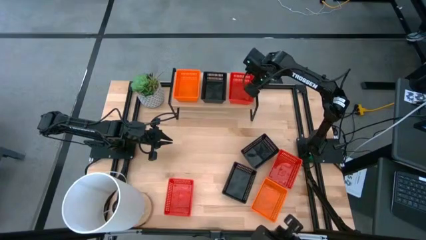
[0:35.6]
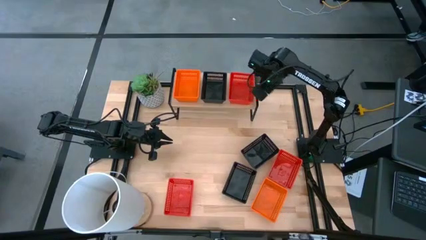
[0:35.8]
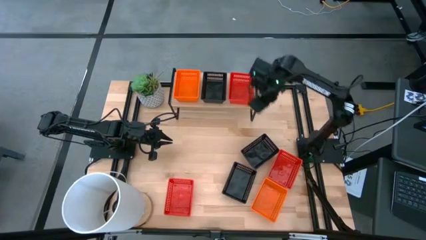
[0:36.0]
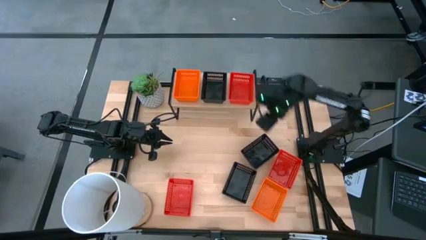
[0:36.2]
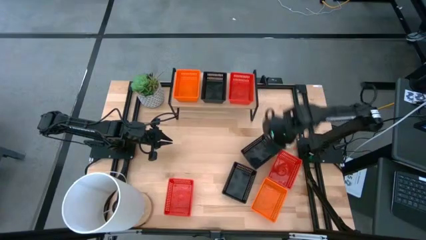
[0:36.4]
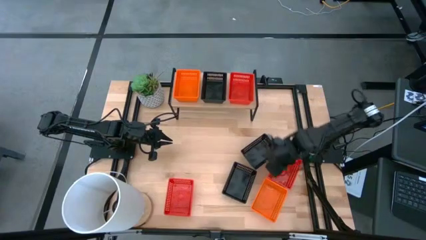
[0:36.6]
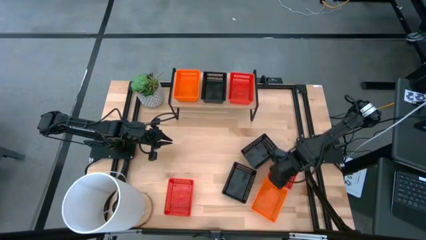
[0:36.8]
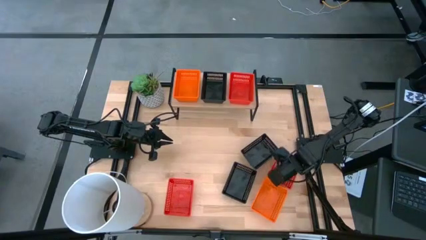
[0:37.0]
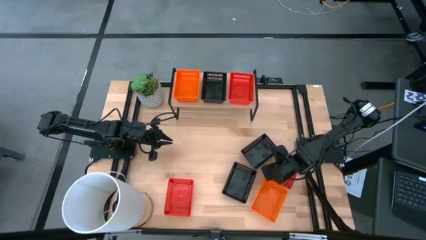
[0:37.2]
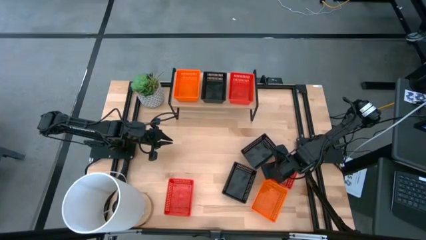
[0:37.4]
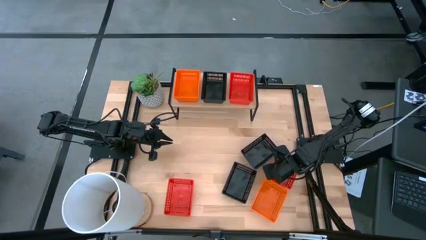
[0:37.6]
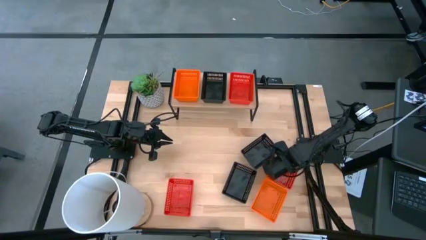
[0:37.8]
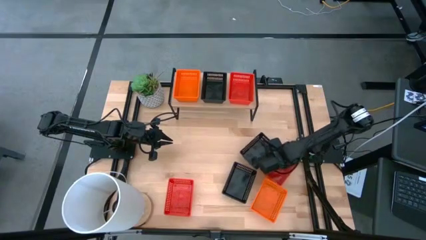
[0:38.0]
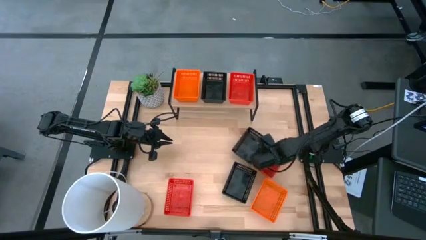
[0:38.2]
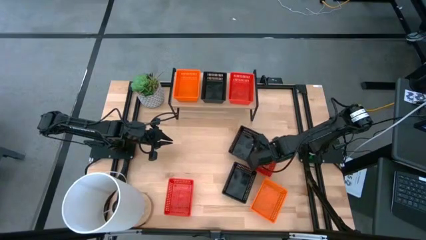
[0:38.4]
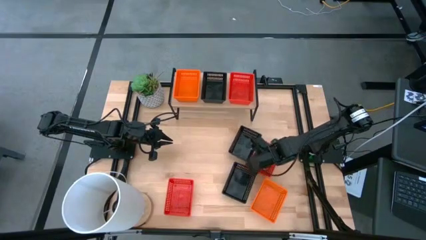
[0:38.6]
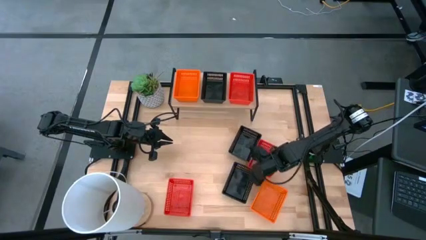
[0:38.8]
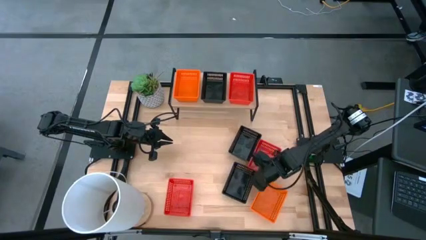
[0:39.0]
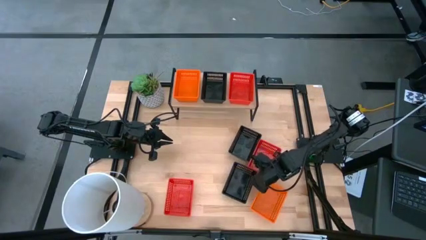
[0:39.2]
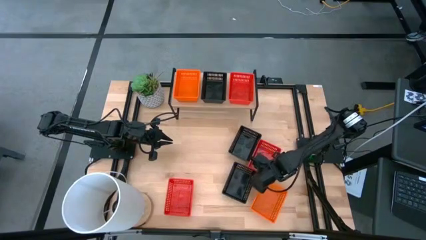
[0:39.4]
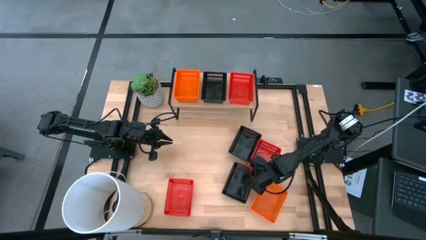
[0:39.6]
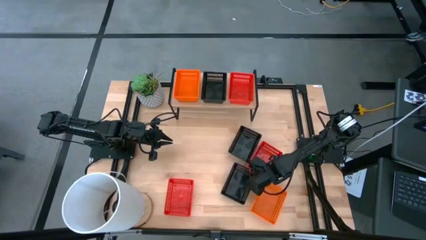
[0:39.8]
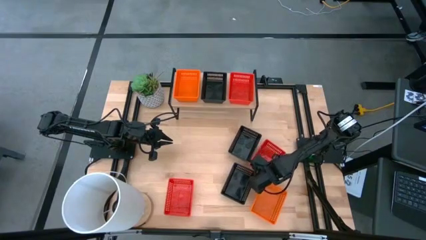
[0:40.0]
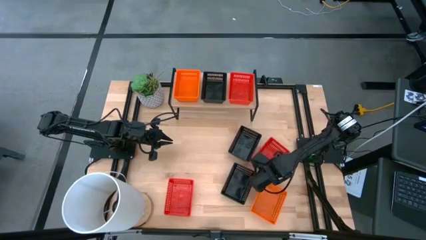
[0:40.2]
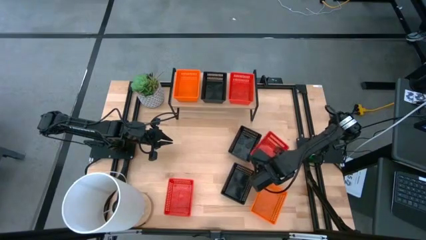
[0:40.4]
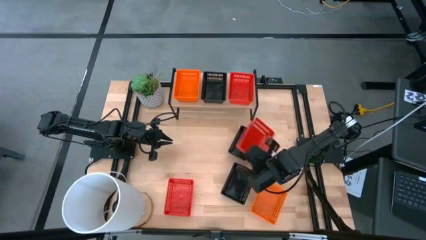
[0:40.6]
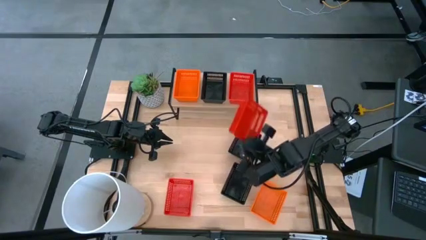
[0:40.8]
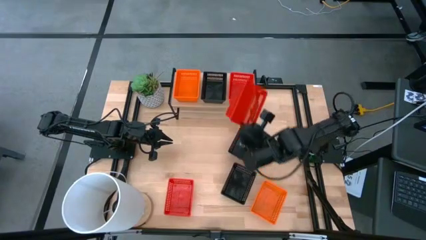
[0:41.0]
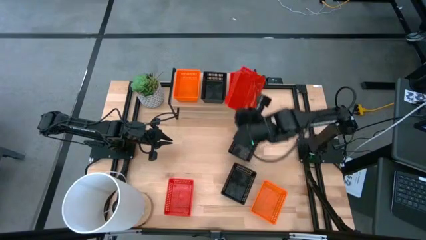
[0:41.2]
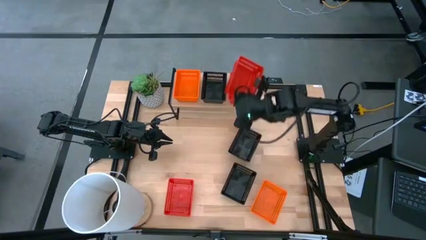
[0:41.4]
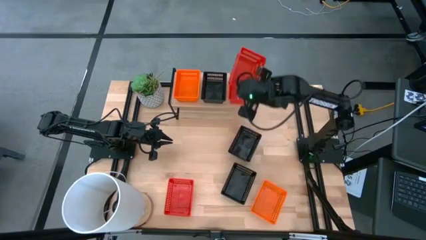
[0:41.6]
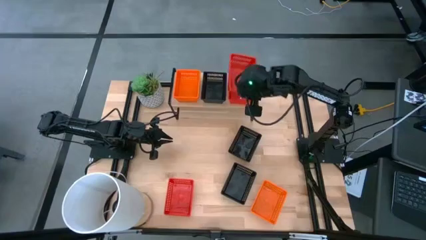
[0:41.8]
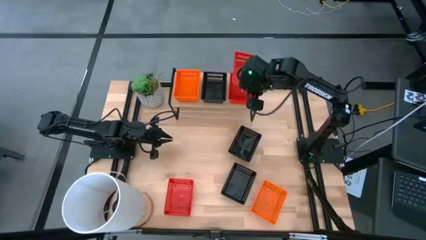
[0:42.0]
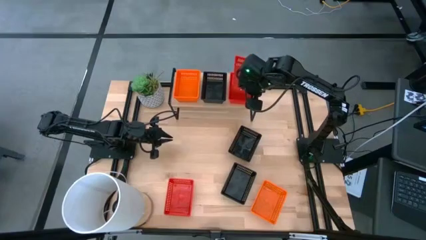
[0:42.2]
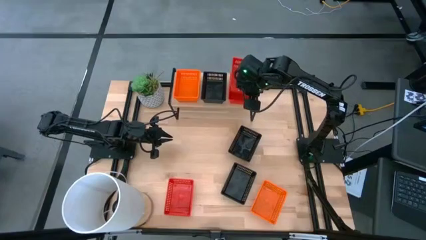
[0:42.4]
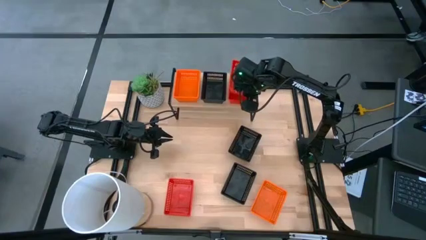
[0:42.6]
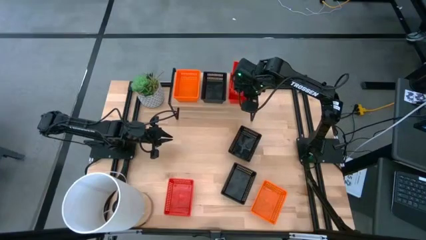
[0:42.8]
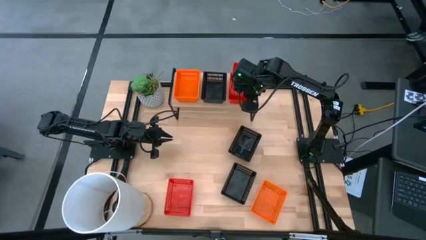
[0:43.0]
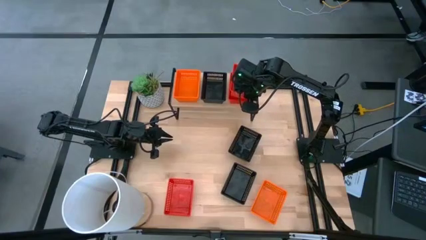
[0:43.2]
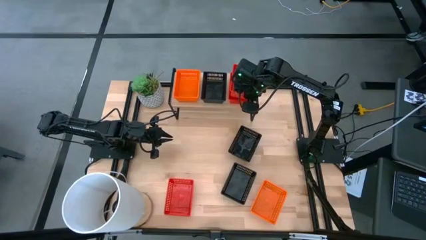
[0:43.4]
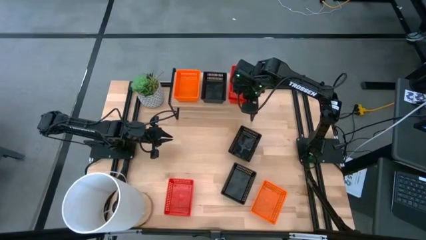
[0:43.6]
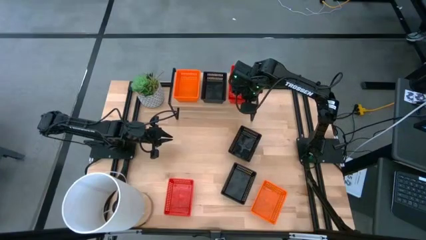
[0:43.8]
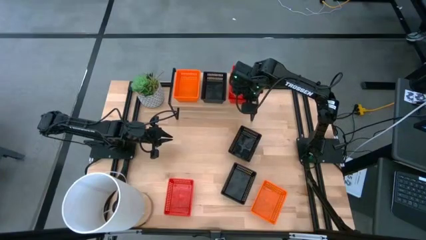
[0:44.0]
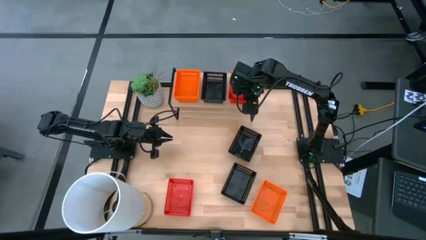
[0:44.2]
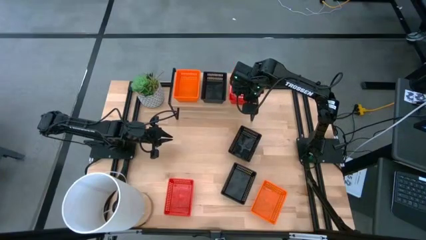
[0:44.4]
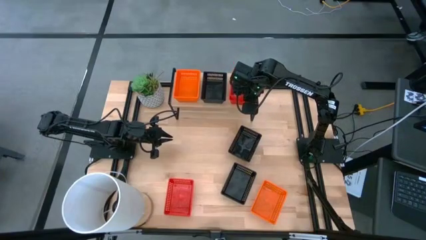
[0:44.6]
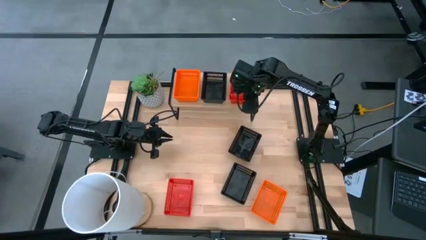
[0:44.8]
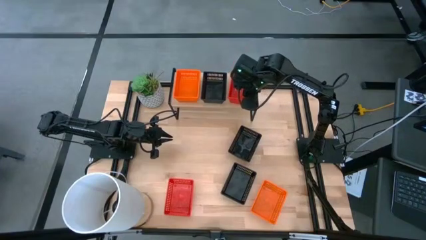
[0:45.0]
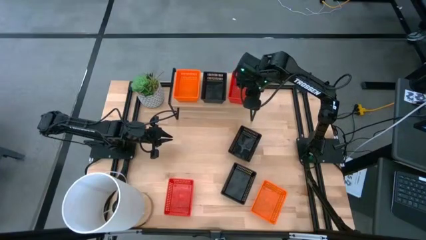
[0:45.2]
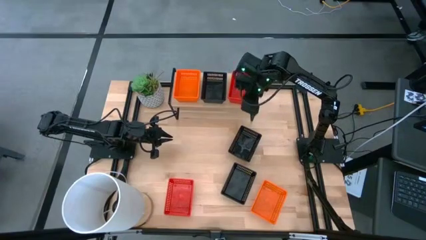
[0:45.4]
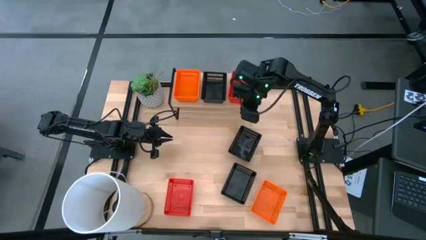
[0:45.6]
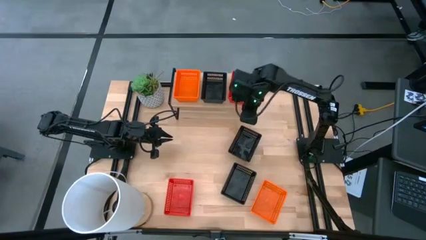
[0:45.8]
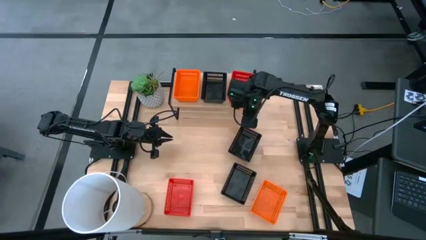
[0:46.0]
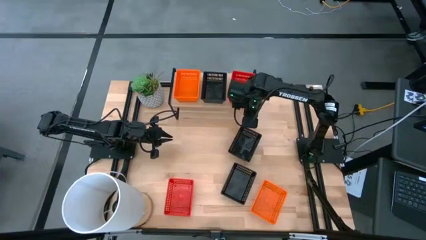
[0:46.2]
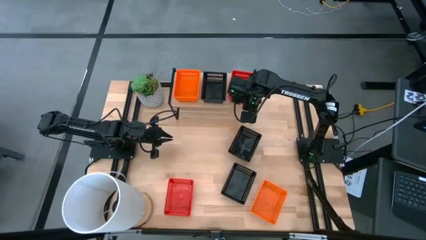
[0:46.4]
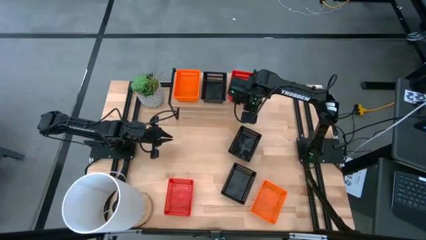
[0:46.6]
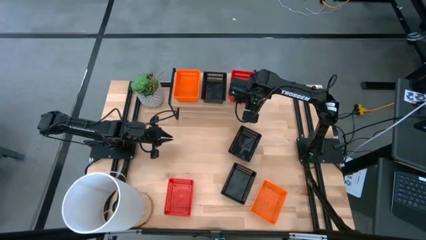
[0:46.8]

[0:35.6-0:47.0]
Task: Stack baskets on shelf by color
Stack the right red bin on top of the red bin on the shelf

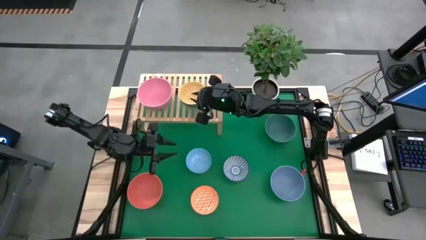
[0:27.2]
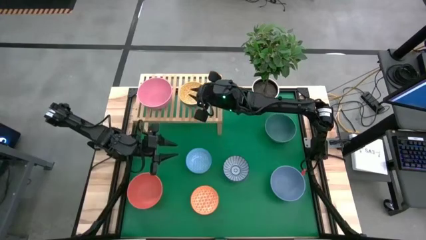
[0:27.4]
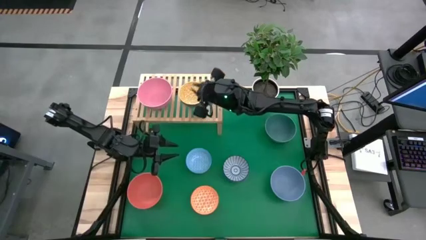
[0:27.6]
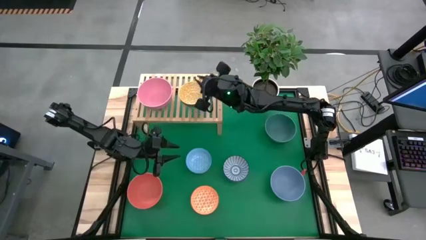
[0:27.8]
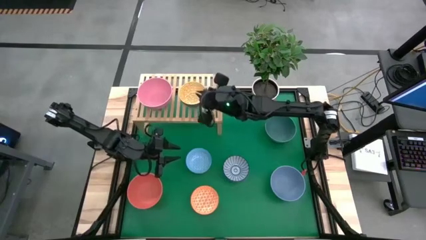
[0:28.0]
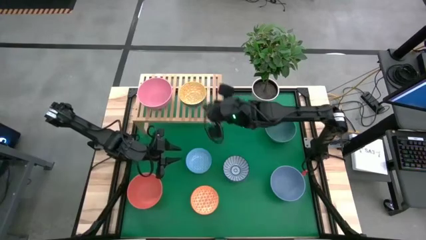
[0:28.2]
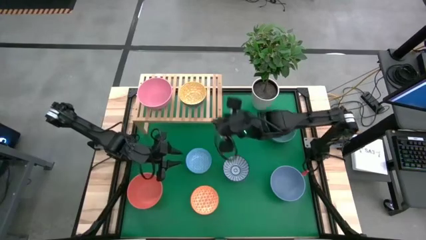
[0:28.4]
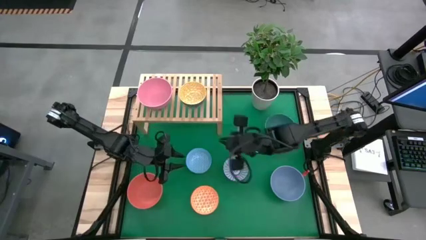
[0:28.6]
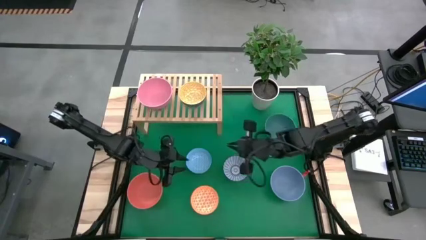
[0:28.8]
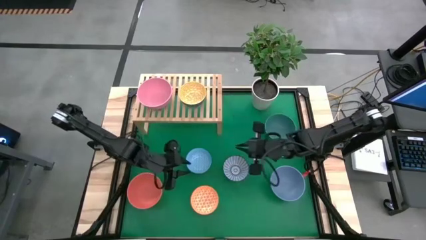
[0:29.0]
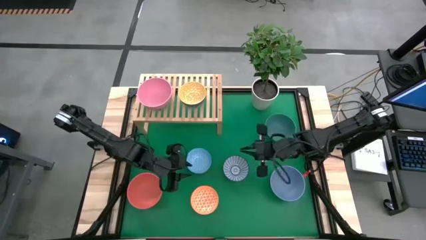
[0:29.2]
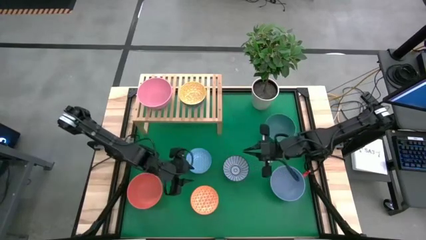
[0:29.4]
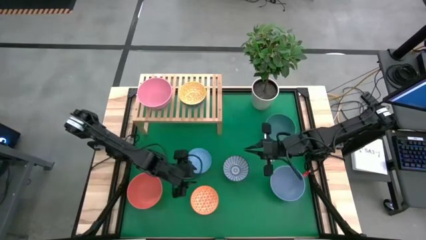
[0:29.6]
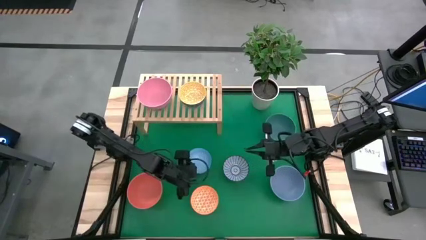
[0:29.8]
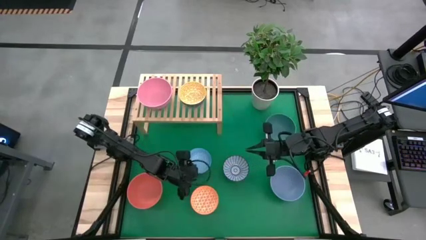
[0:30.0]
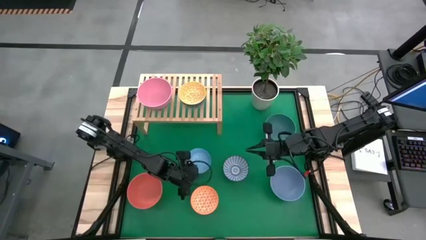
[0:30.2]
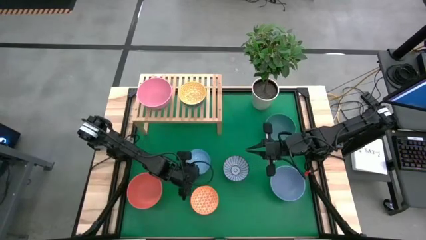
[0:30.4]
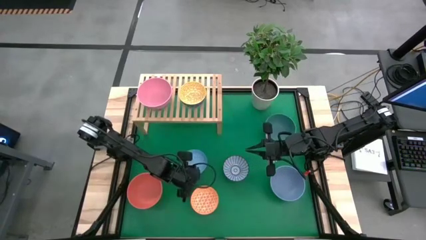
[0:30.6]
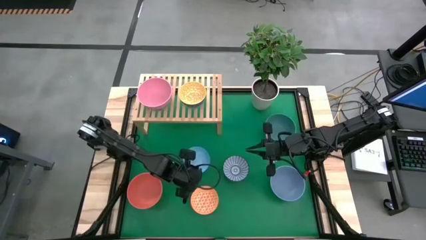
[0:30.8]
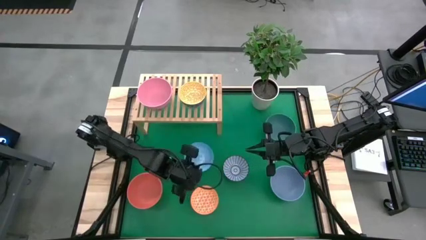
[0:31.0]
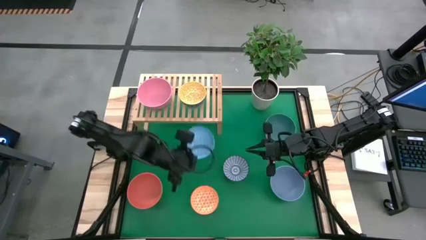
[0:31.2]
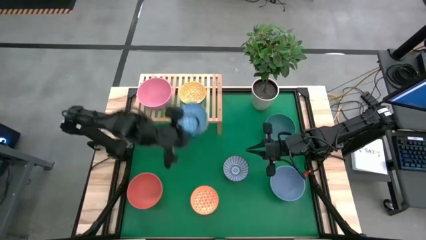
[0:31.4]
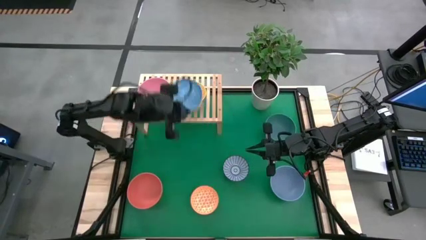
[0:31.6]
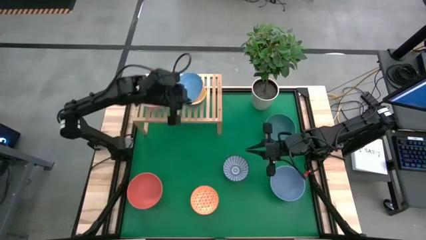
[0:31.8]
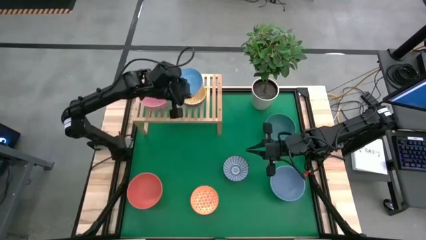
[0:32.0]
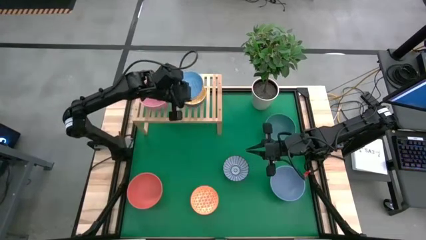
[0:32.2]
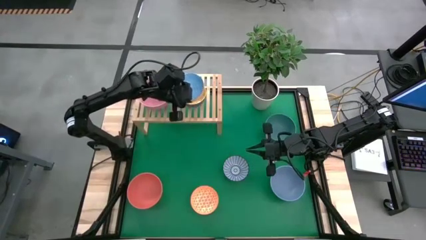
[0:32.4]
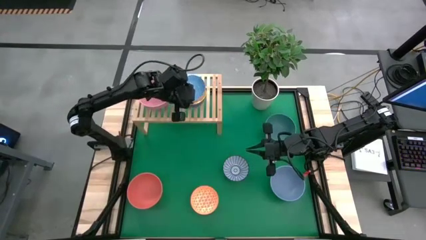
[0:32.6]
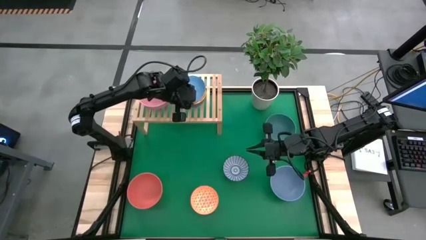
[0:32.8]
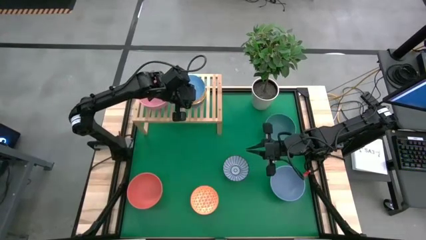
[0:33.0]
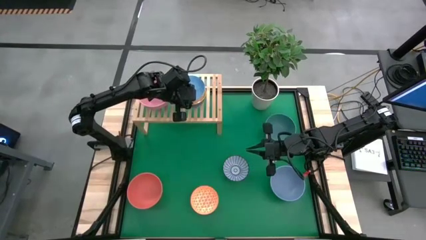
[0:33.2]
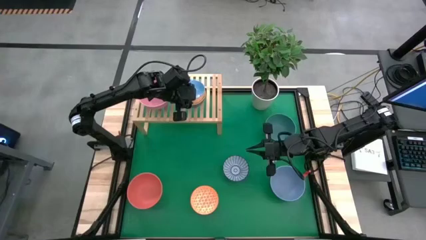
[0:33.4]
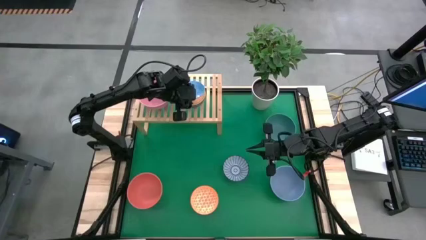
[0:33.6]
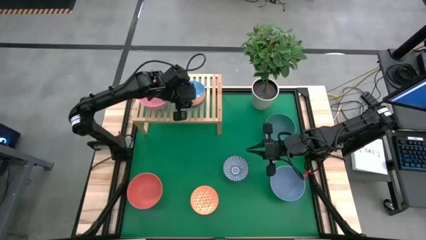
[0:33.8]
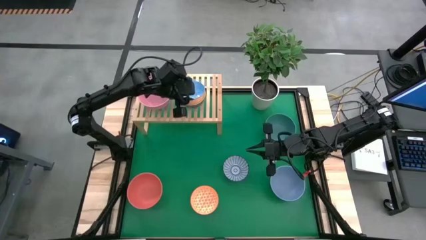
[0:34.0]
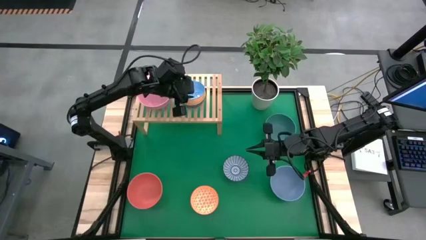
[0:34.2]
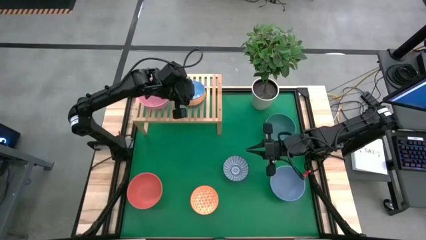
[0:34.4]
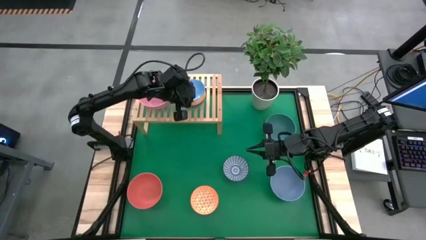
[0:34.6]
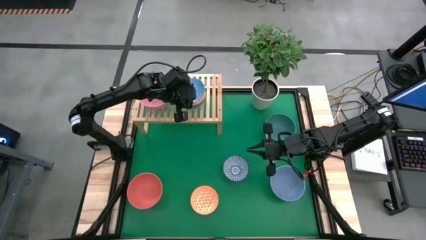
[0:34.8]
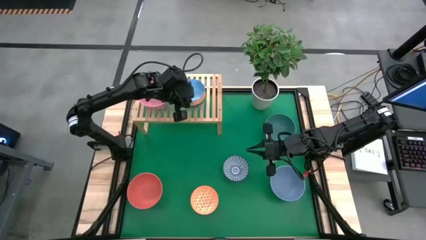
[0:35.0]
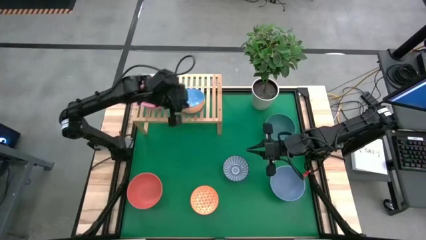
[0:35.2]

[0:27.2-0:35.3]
Task: Place and stack bowls onto a shelf
Stack the light blue patterned bowl on top of the yellow patterned bowl on the shelf
